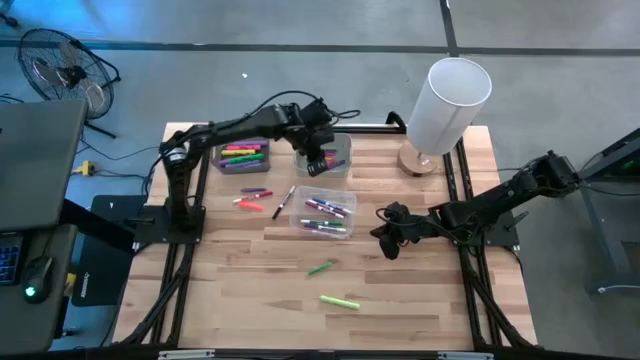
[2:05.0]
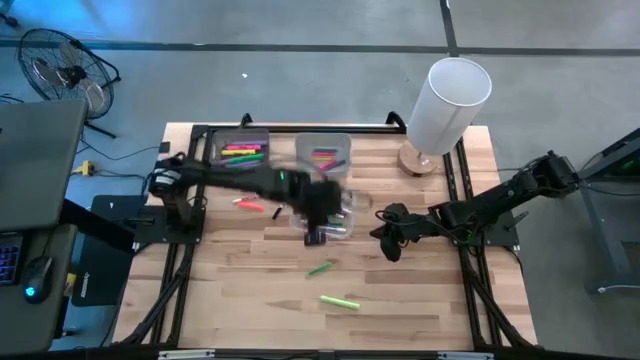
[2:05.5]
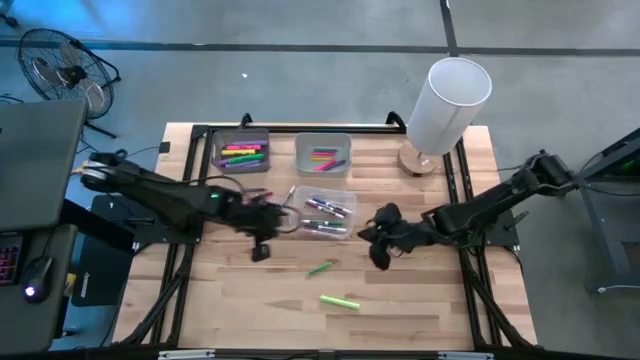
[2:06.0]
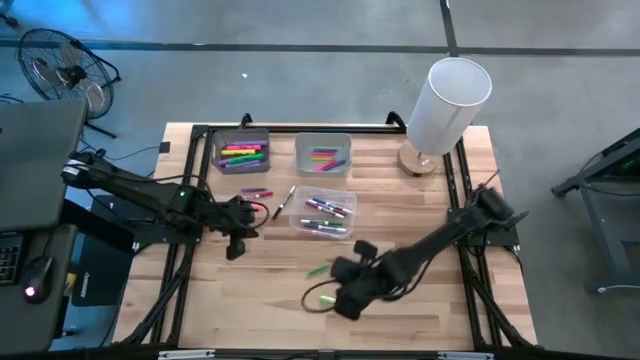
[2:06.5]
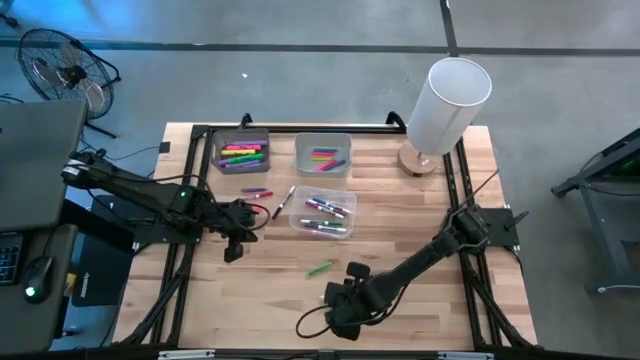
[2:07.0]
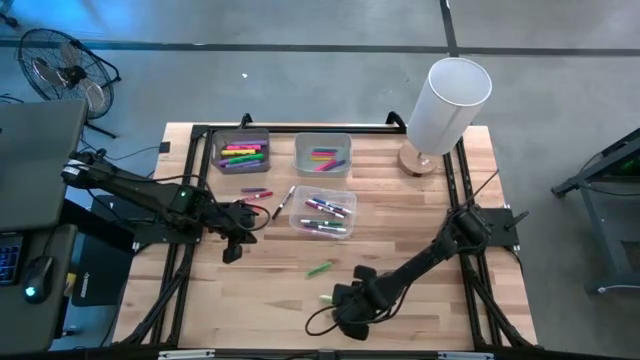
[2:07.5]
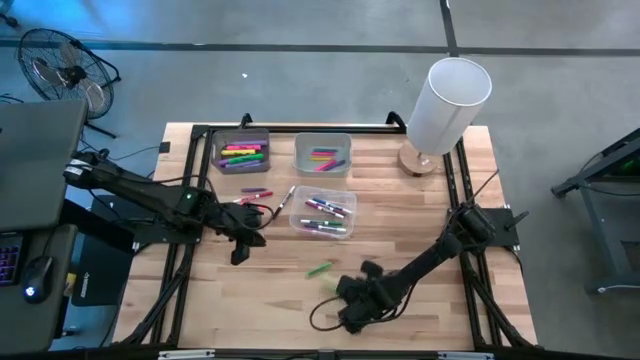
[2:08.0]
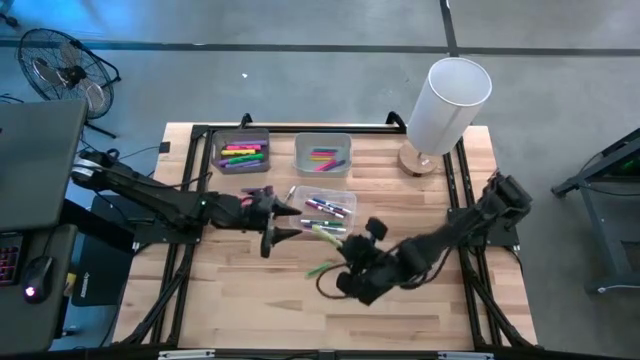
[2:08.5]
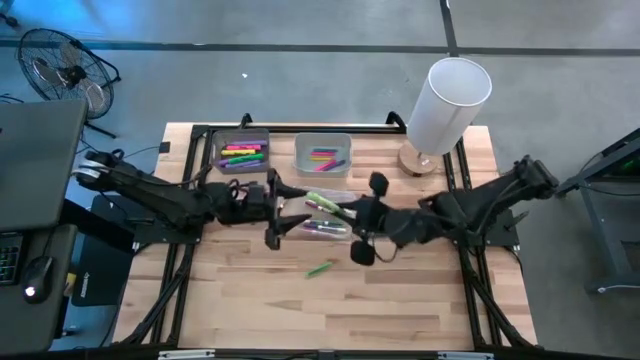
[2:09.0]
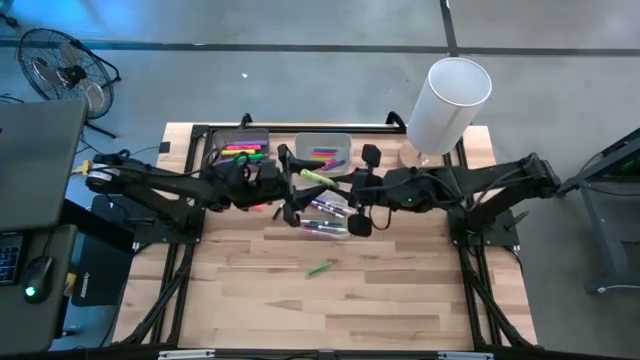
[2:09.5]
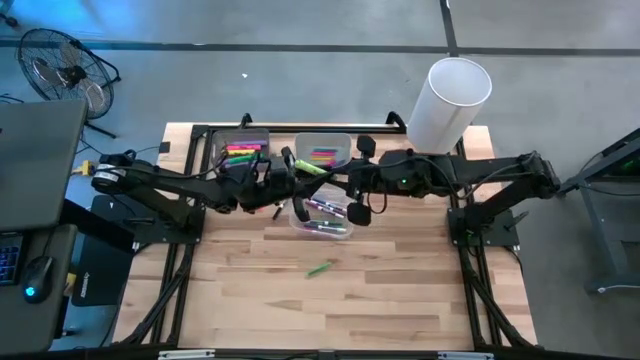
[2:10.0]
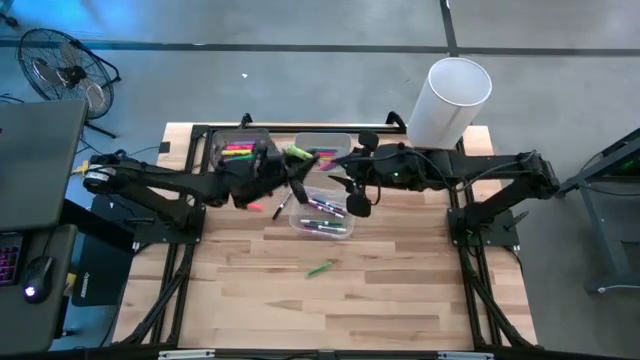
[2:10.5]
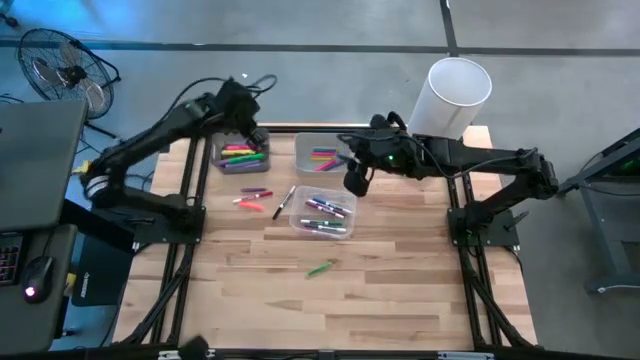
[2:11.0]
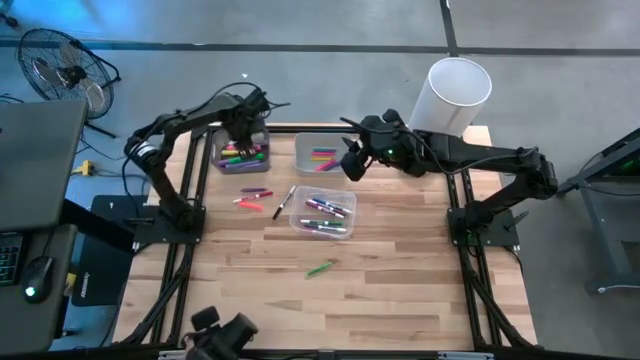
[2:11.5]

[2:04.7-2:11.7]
Task: Pick & Place Markers
Put the light green highlighter into the black bin

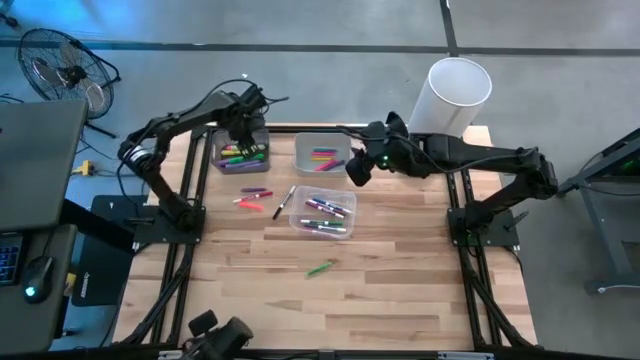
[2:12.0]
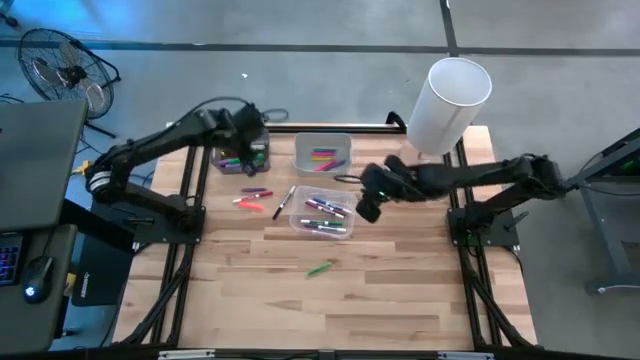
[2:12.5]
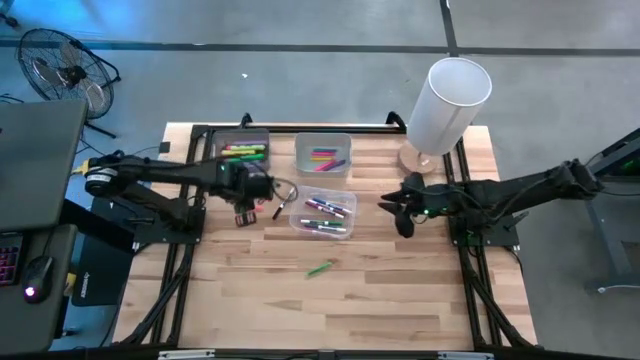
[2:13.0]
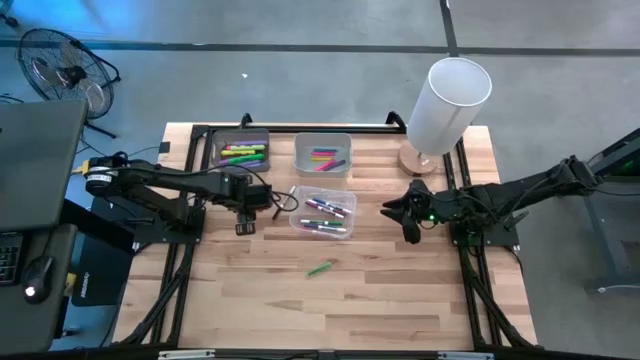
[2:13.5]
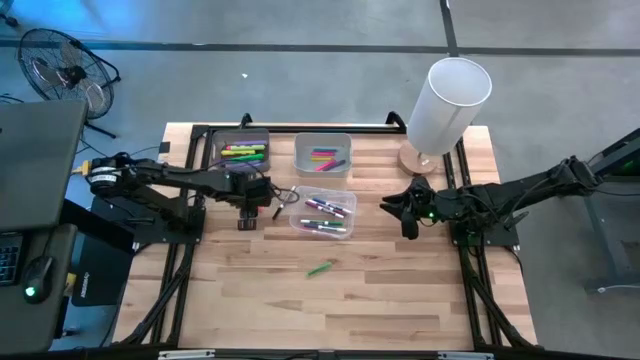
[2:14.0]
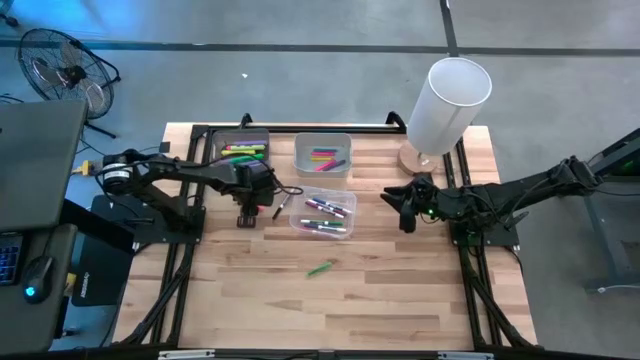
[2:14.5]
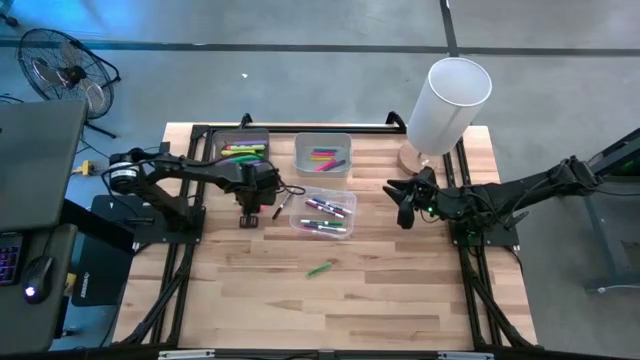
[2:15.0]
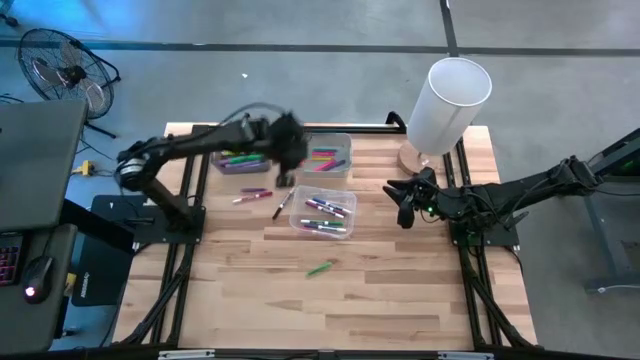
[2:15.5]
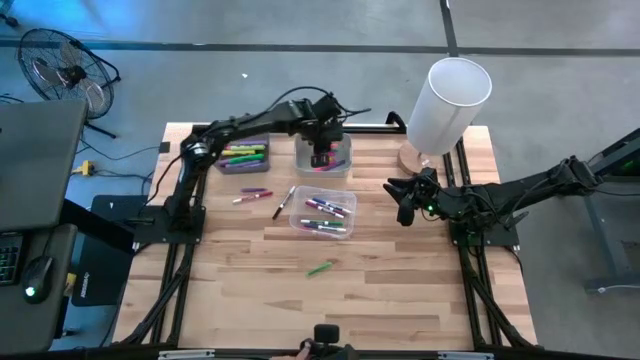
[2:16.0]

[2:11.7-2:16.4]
Put the orange pen into the gray bin

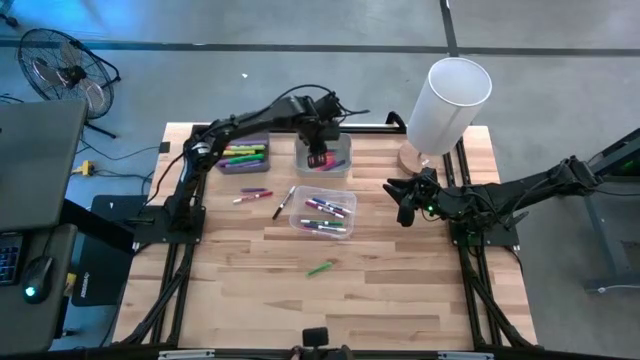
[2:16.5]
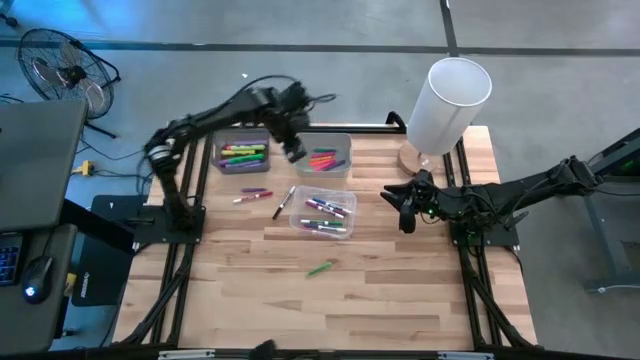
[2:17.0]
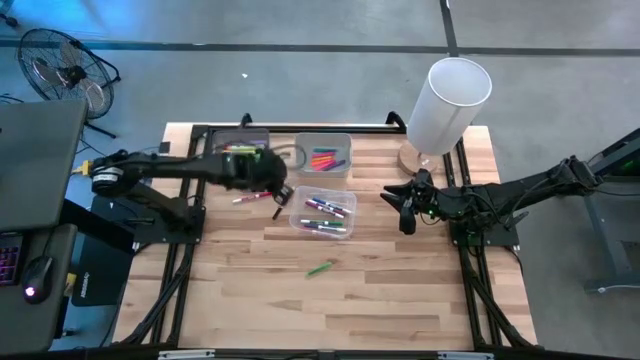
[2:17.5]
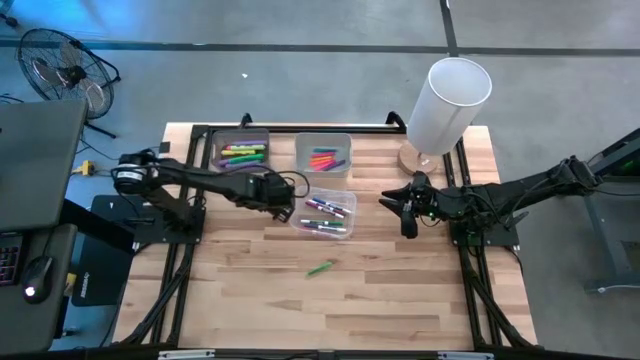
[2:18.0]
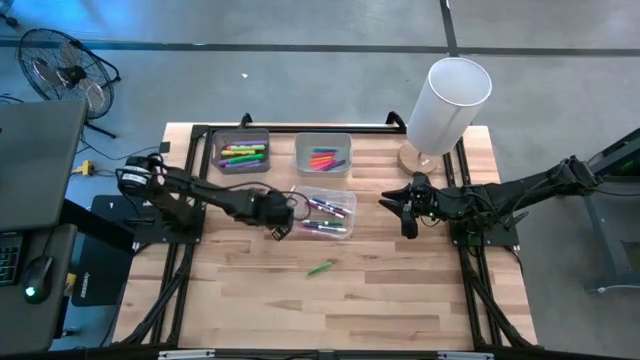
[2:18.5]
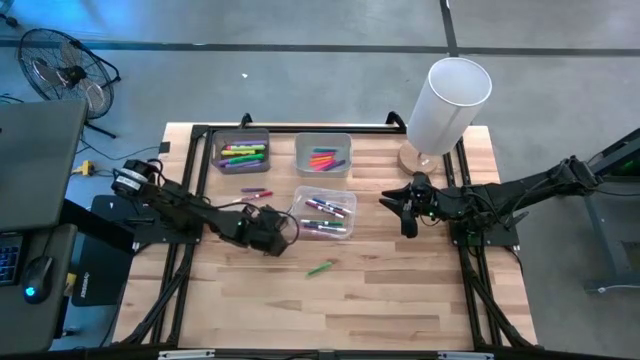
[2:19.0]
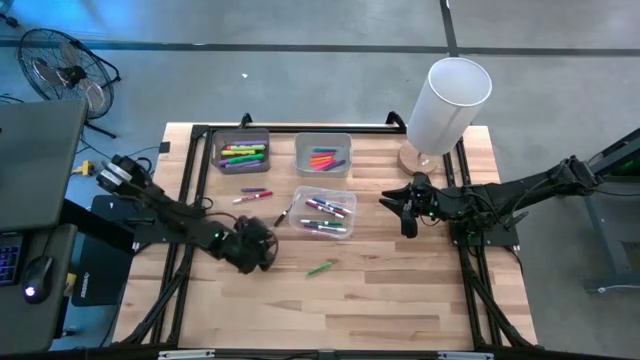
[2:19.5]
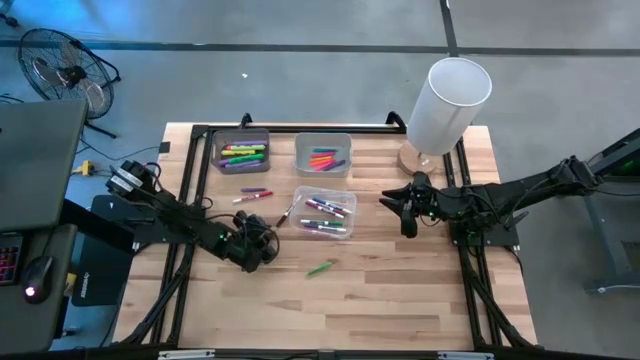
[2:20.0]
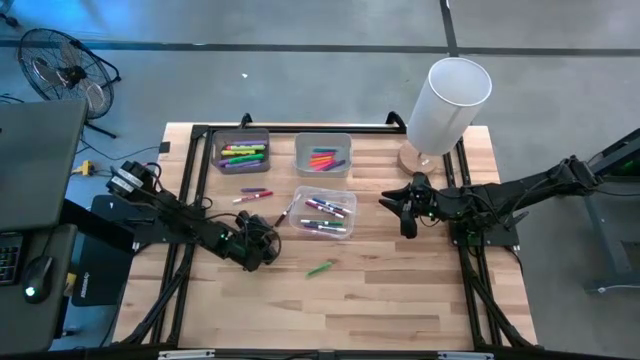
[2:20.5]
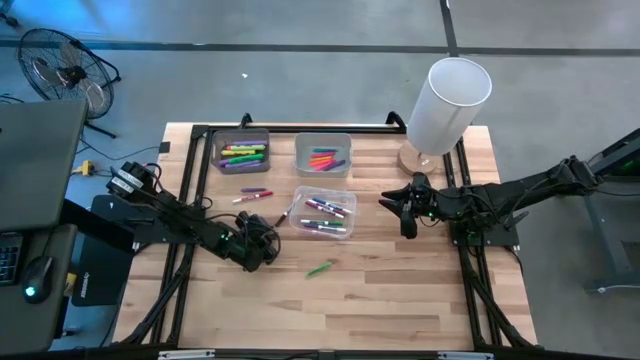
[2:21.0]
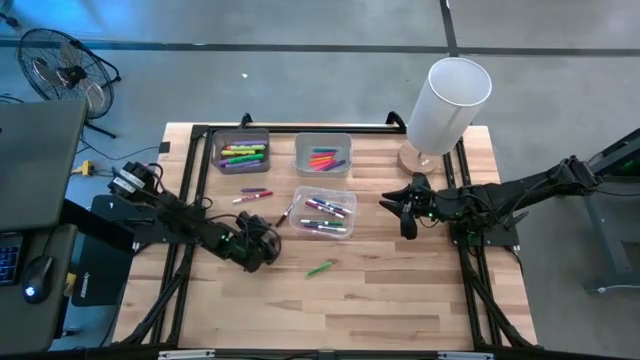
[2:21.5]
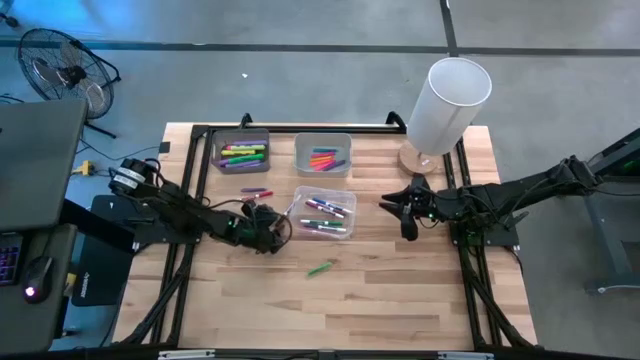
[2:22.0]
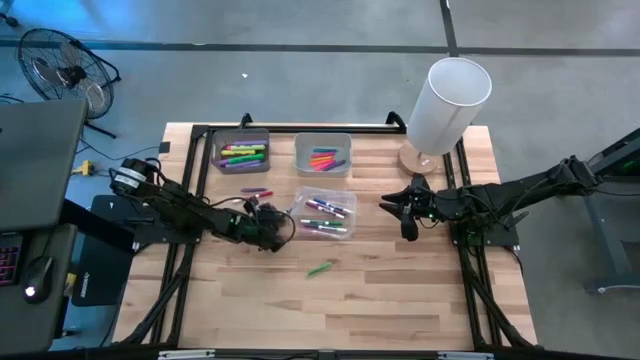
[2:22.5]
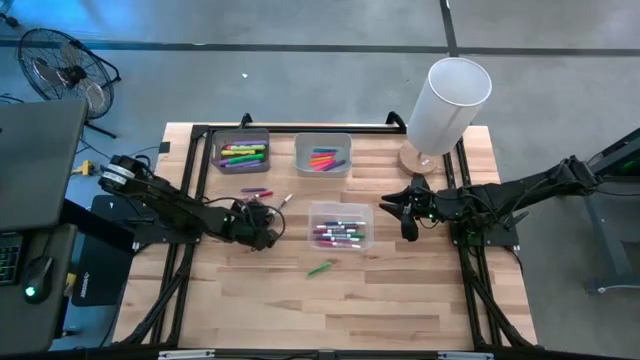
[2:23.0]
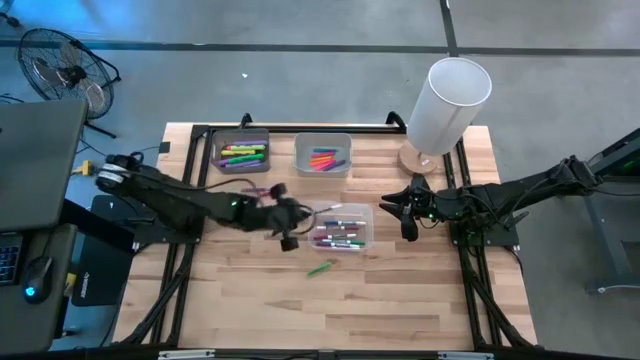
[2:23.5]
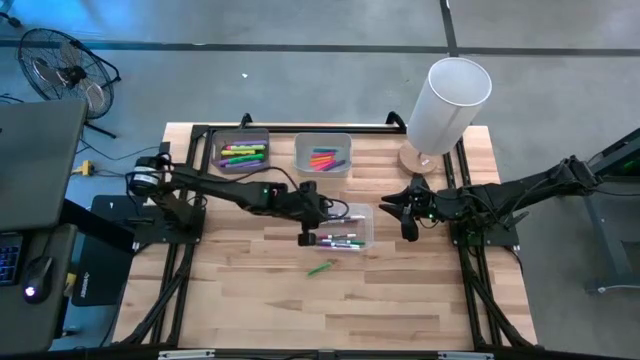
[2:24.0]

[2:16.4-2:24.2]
Put the black marker into the white bin

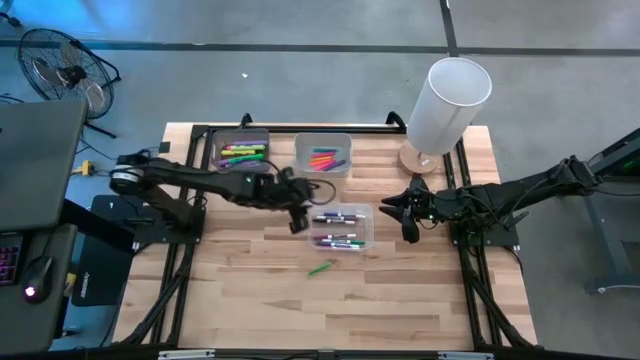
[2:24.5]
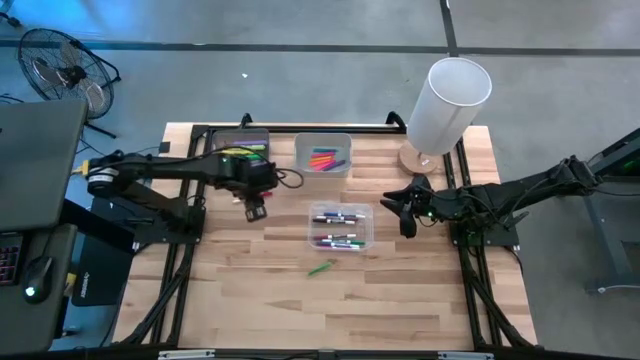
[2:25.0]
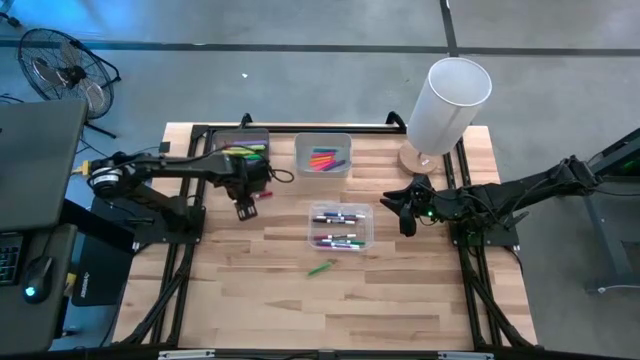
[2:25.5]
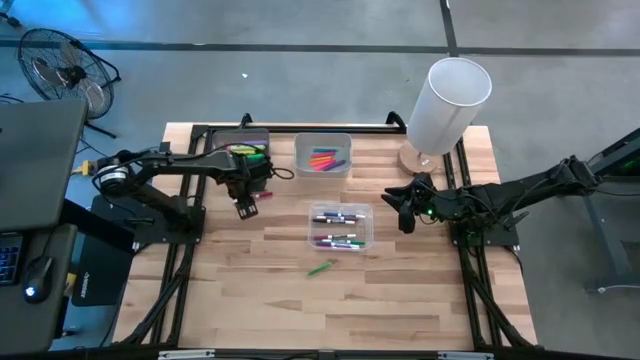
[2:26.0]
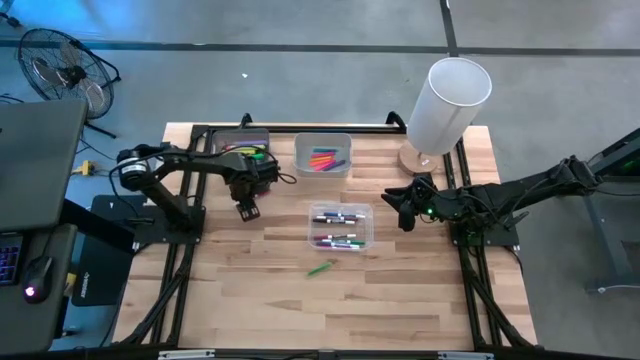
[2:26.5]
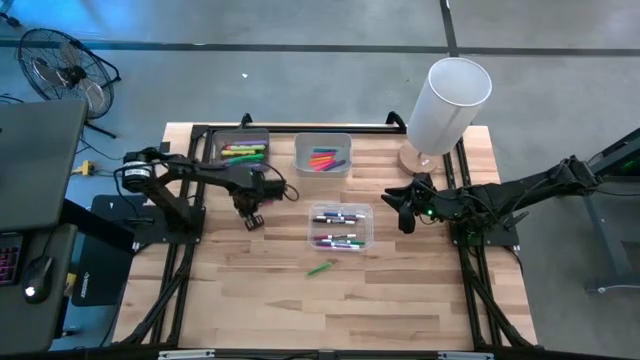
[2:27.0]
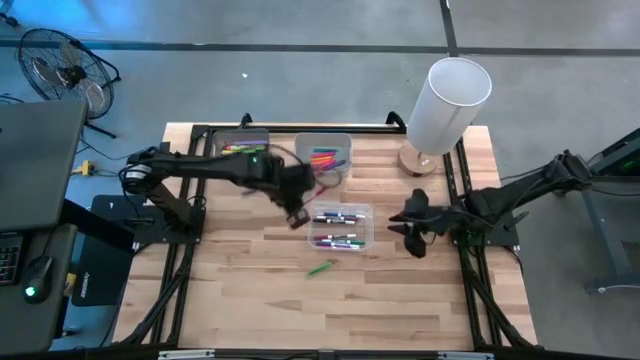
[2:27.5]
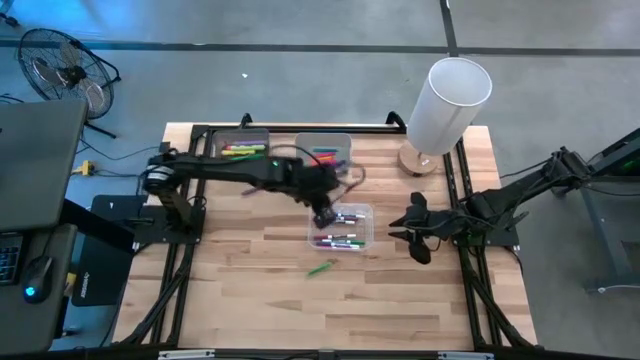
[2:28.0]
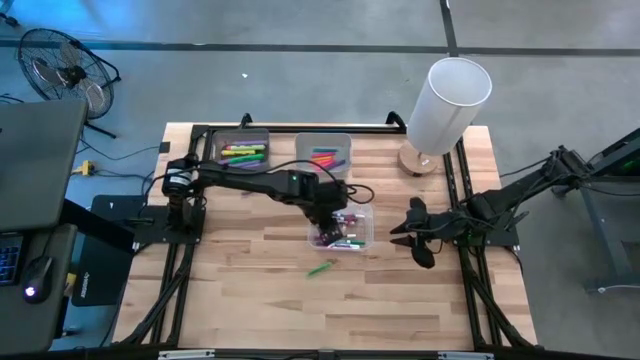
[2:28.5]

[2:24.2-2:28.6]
Put the red marker into the white bin
